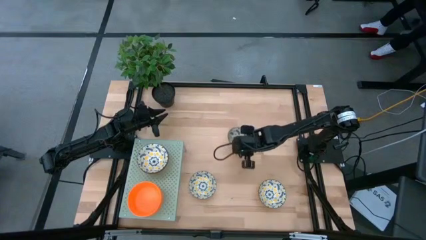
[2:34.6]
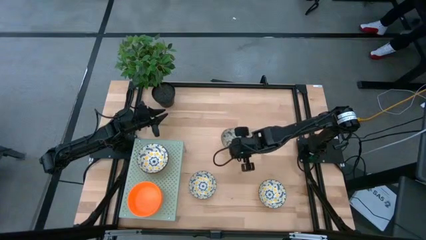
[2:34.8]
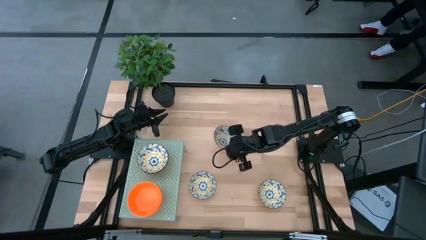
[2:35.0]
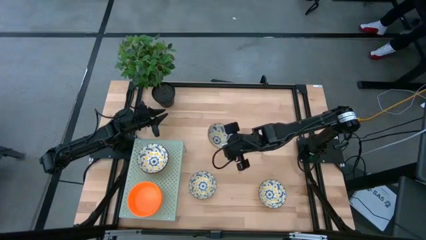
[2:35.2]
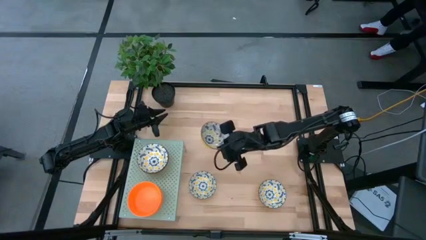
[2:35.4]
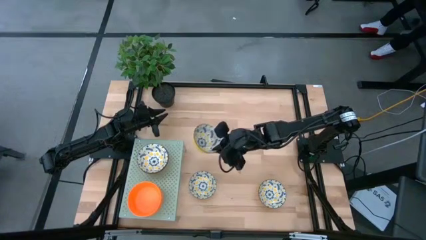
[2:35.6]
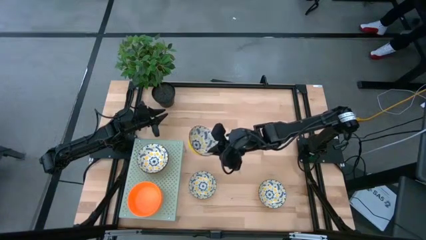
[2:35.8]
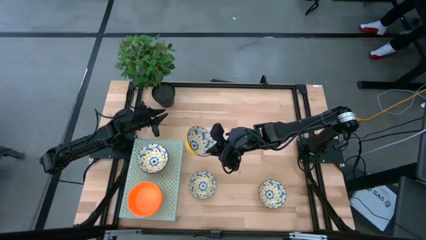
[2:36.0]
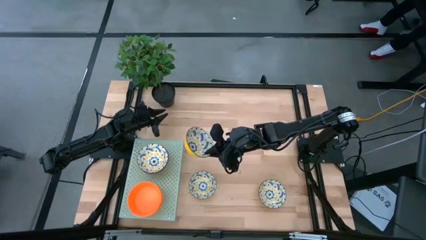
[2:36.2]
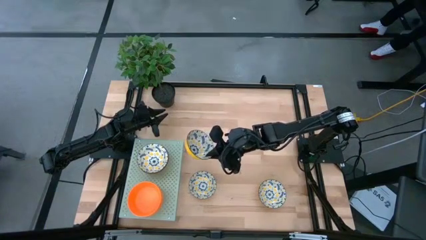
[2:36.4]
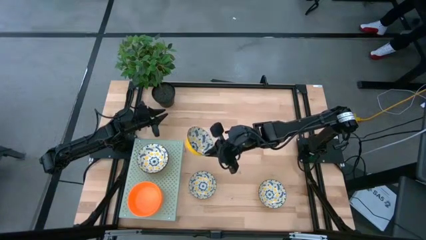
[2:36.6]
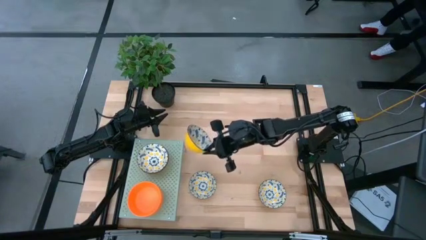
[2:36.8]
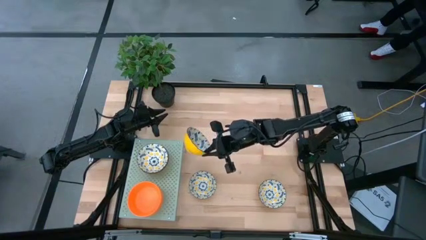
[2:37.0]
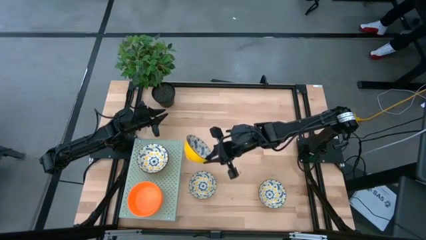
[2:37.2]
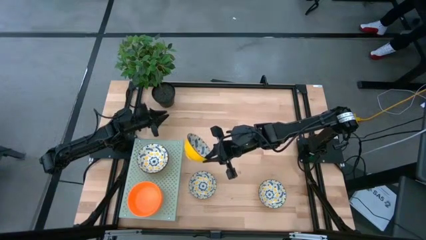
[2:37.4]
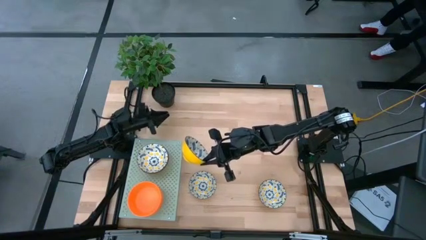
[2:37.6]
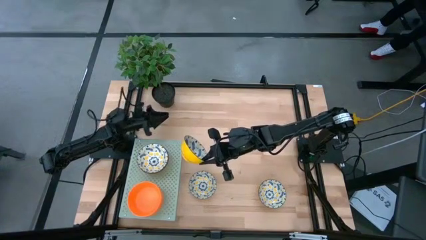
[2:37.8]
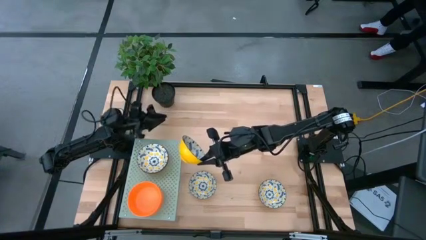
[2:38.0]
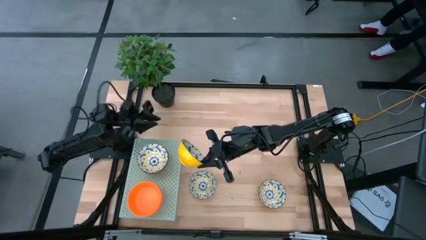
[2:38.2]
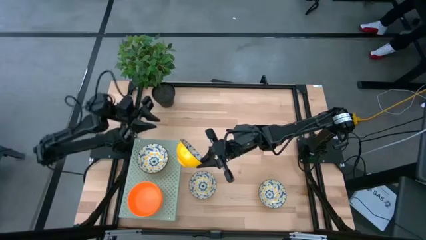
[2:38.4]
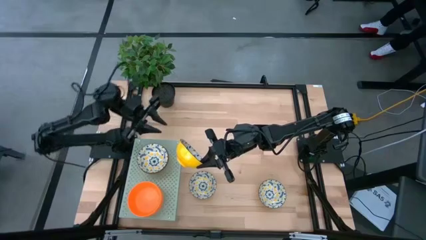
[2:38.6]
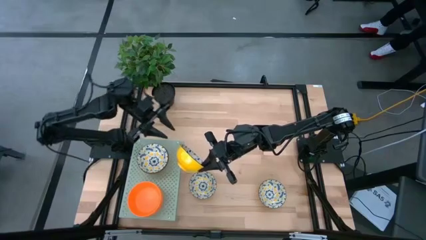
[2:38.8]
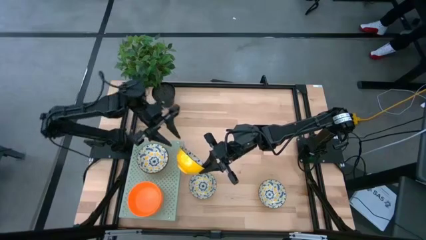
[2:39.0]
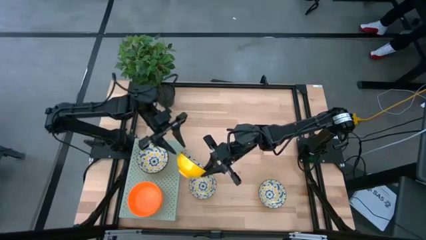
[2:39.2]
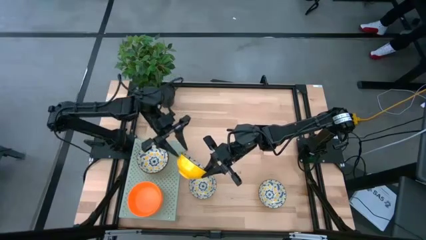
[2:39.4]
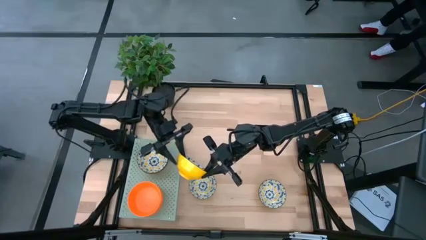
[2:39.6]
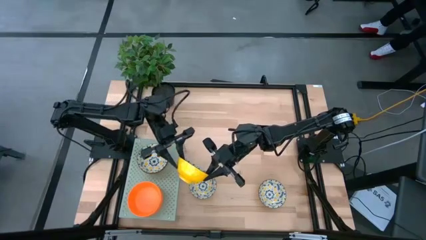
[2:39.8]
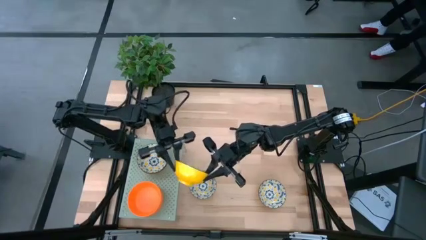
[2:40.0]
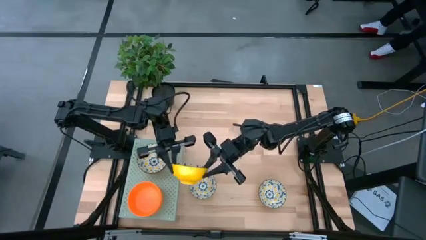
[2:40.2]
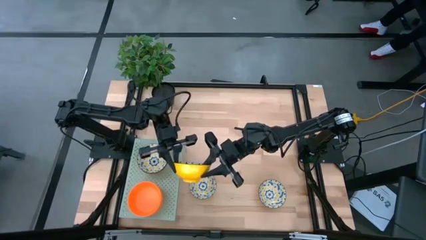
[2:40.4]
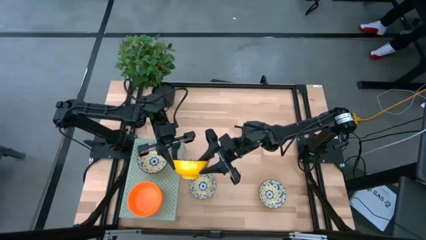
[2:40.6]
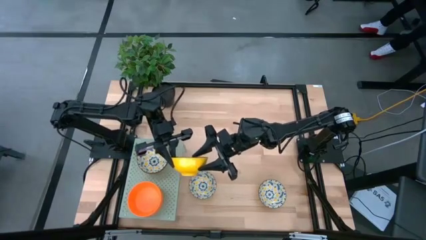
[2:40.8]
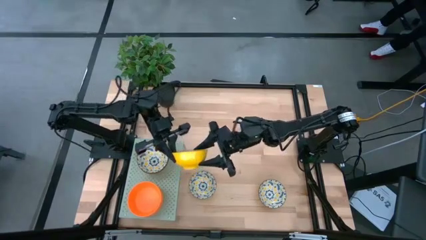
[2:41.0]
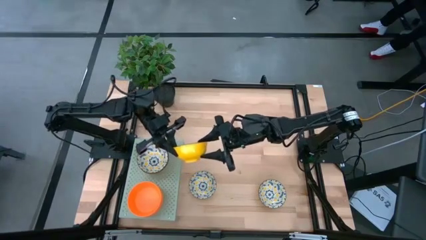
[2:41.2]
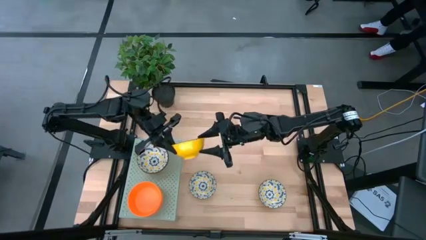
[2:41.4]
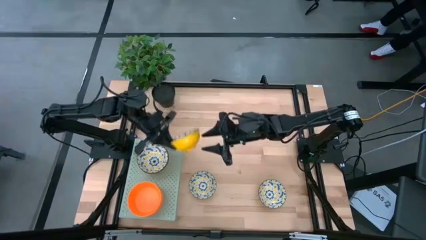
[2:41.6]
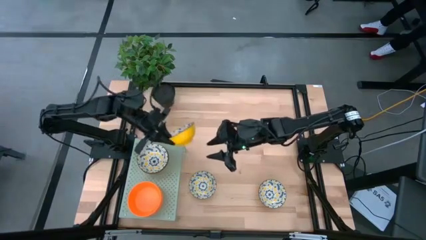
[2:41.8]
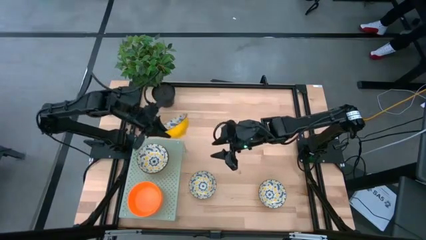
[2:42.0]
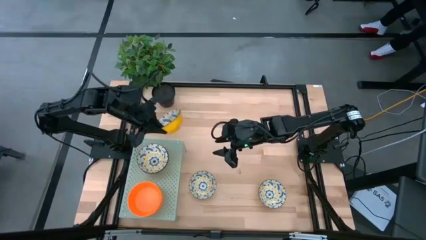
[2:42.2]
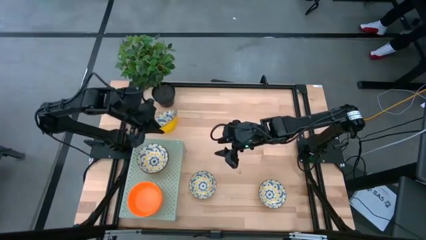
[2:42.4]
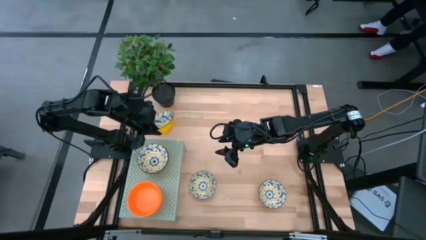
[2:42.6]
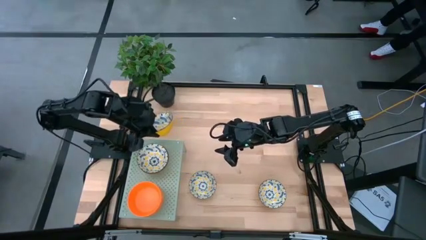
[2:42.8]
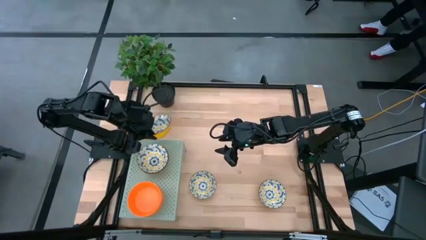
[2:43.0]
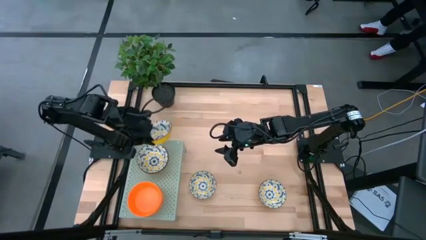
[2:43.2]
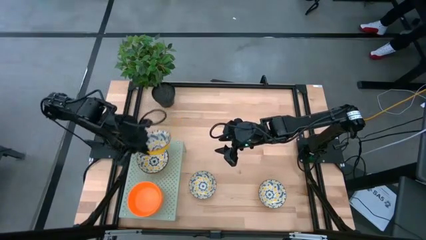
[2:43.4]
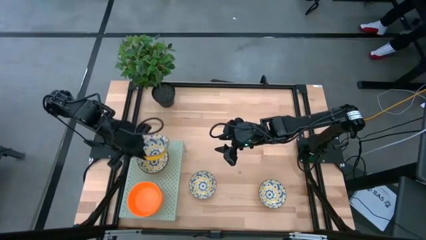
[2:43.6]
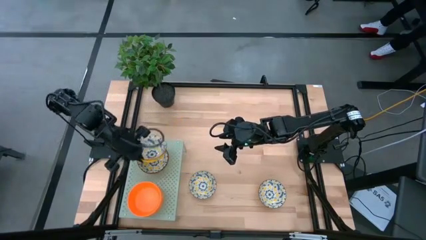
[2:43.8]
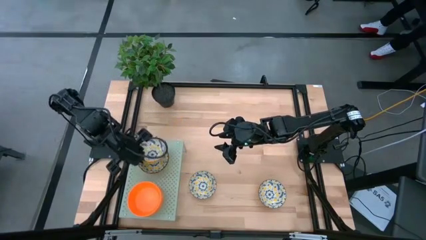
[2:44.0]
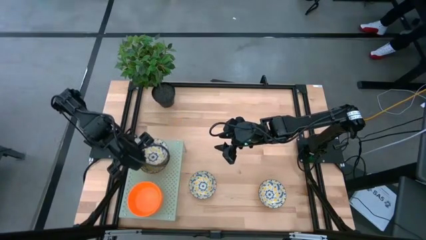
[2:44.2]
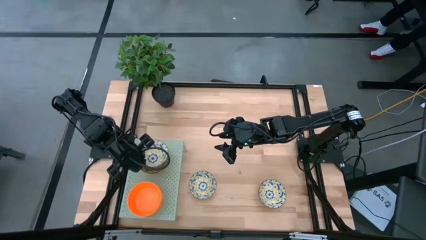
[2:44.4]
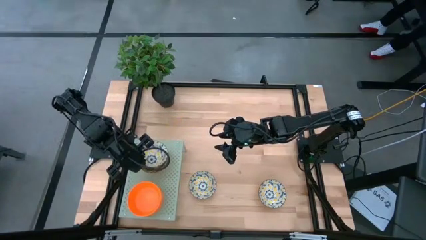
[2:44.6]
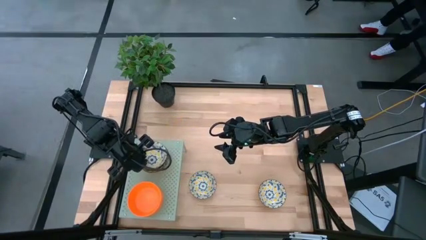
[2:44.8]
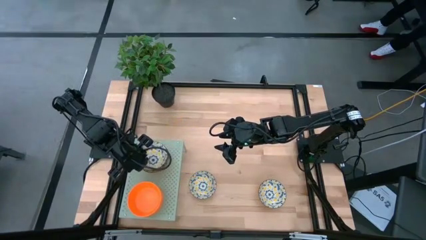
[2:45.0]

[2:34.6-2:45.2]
Task: Pick & Place Mini bowls
Stack the patterned bowl on top of the patterned bowl on the shelf

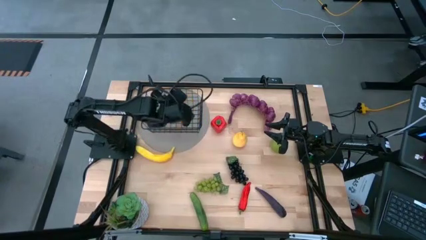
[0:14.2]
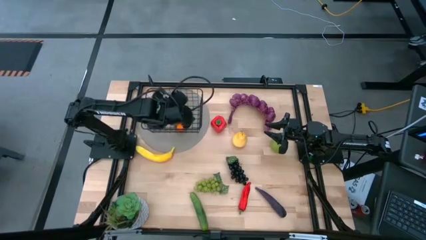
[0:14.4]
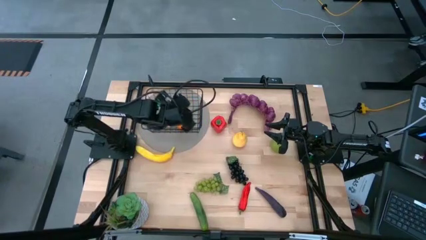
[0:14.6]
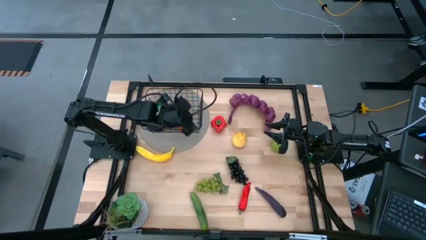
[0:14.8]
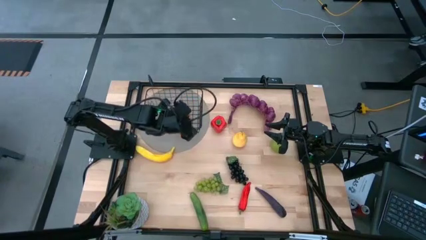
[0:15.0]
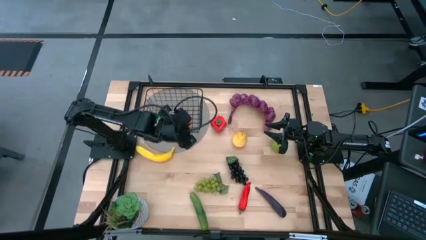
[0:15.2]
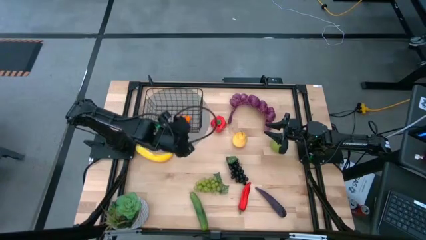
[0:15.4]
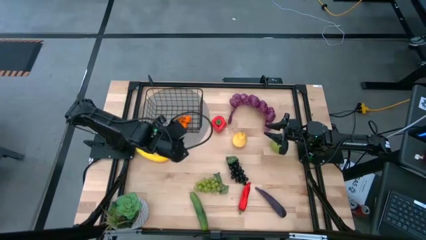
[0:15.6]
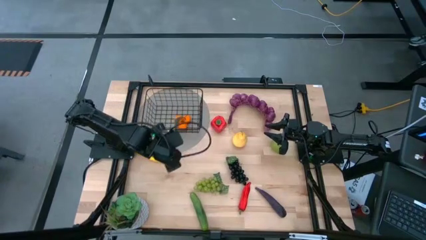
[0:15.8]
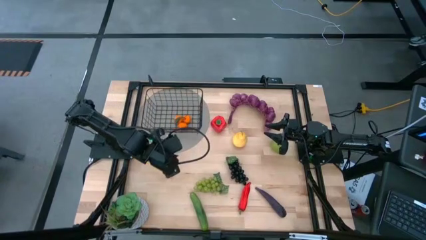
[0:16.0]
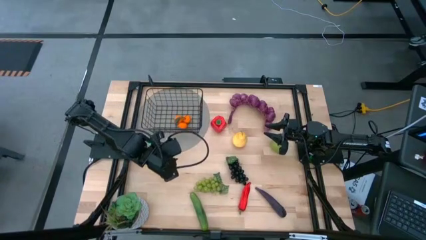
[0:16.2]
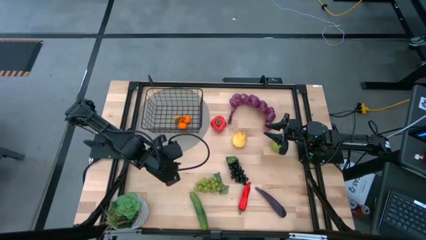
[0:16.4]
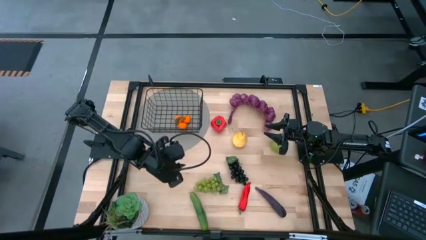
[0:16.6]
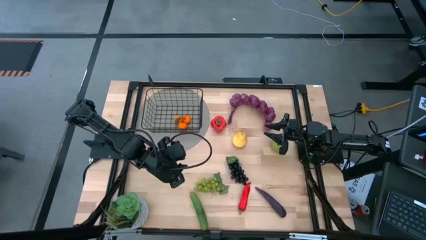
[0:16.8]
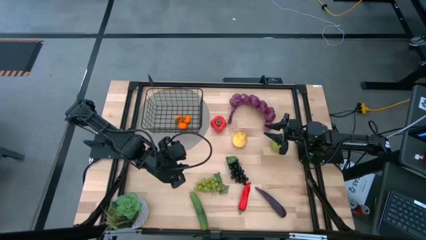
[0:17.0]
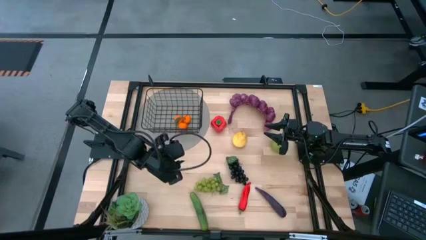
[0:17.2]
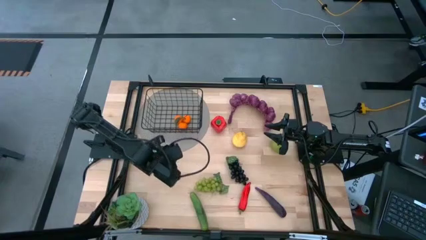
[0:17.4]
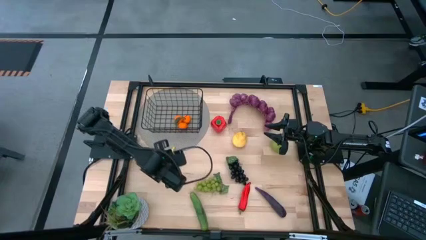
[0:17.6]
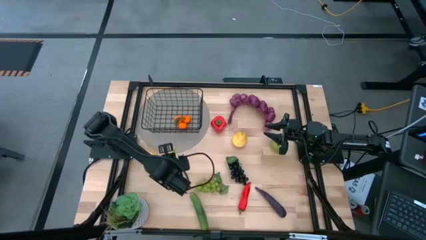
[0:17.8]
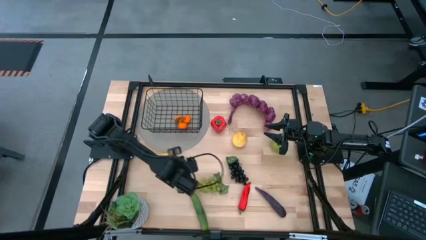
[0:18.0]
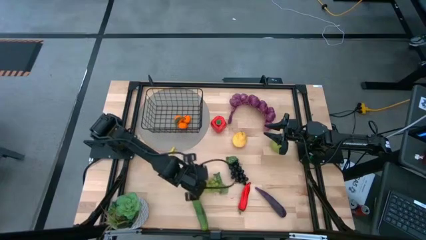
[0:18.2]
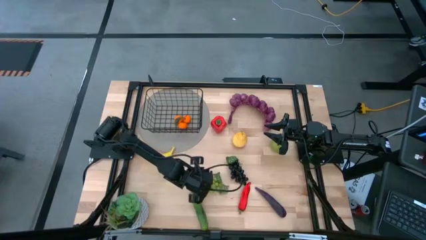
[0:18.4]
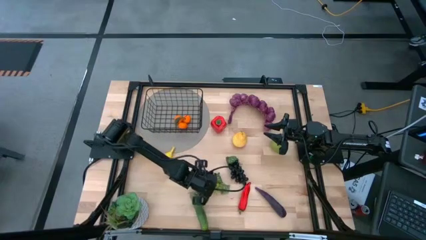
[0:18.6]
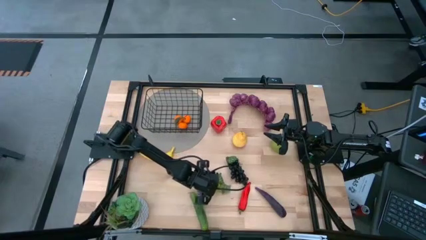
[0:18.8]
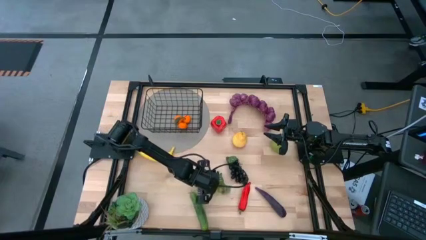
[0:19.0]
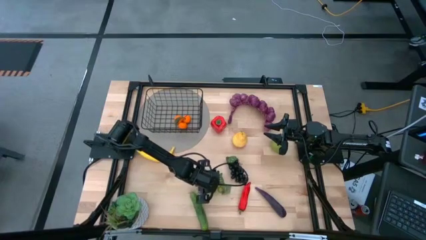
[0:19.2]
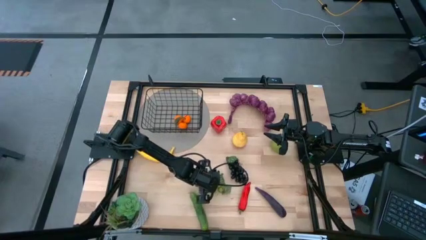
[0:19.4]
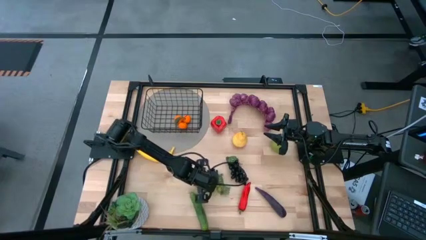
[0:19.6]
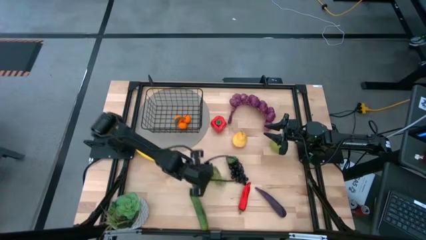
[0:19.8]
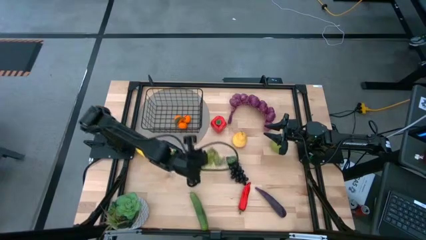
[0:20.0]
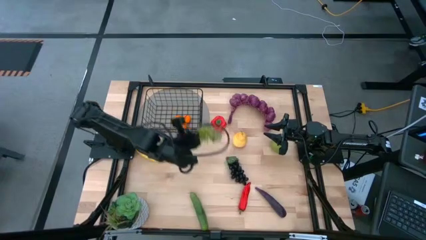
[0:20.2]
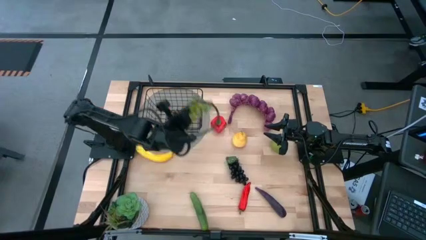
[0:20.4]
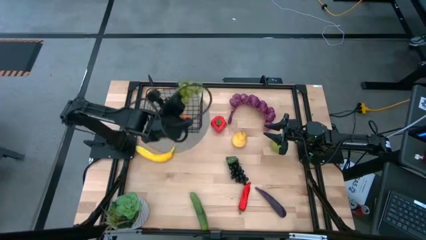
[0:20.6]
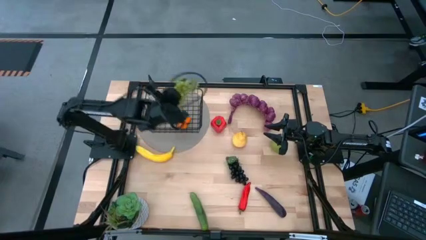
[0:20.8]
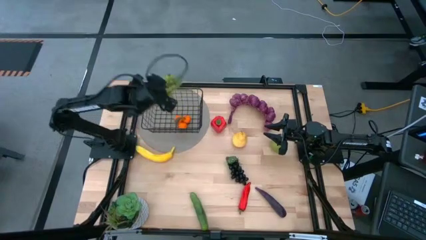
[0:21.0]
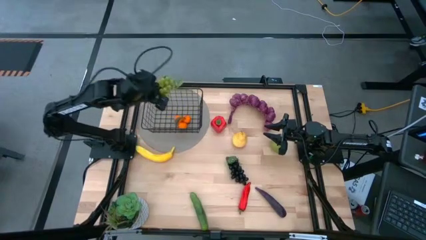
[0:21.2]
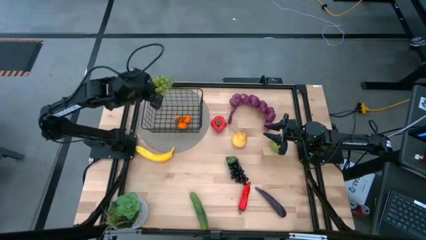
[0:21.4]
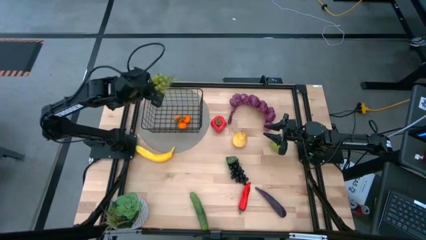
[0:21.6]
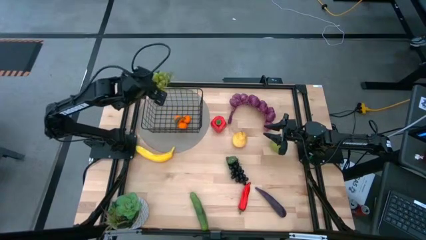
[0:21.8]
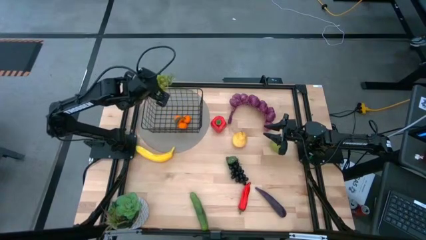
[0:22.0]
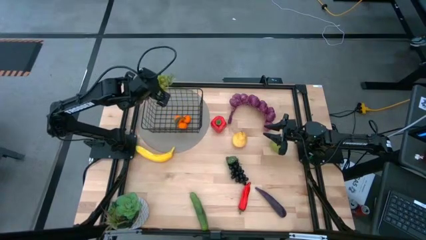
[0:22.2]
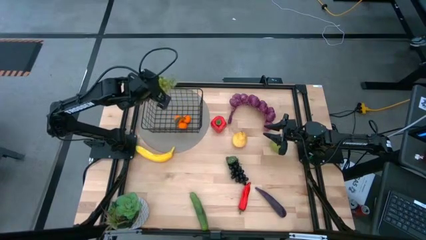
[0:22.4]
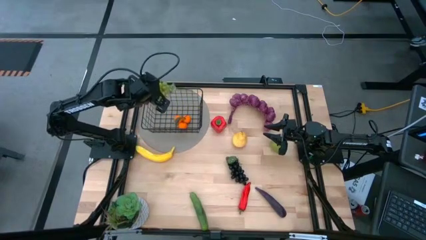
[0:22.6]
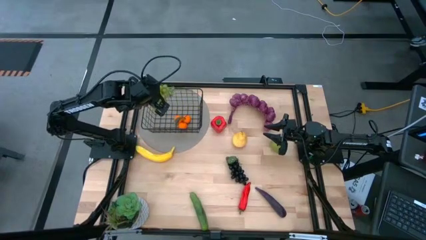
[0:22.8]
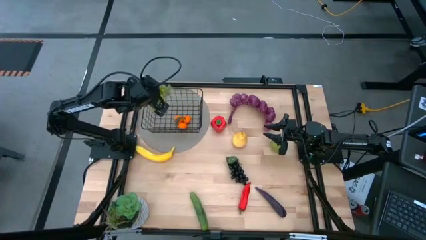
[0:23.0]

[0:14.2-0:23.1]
Task: Build produce basket
Put the green grapes into the wire basket
